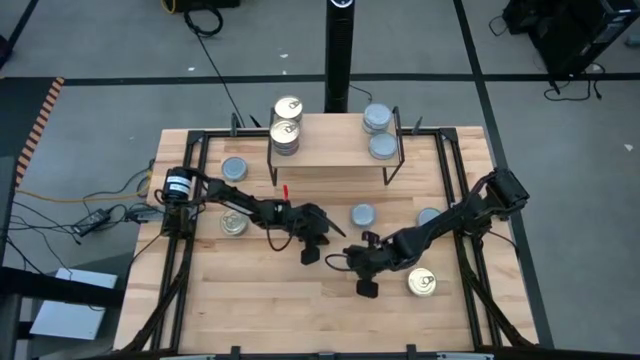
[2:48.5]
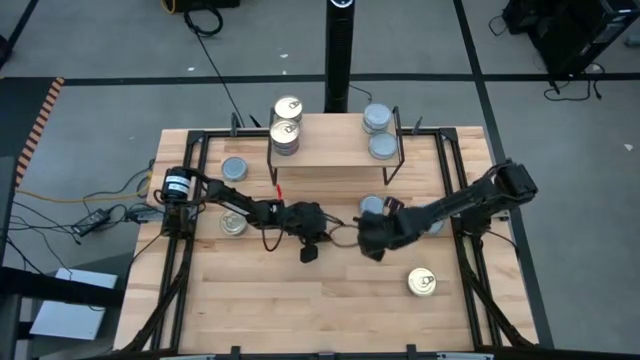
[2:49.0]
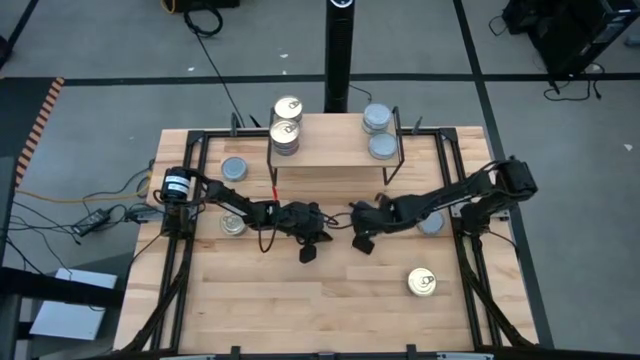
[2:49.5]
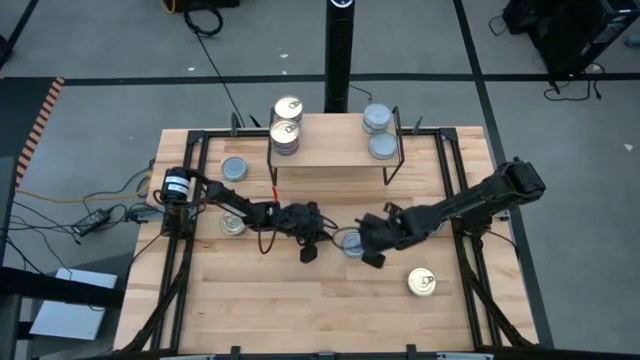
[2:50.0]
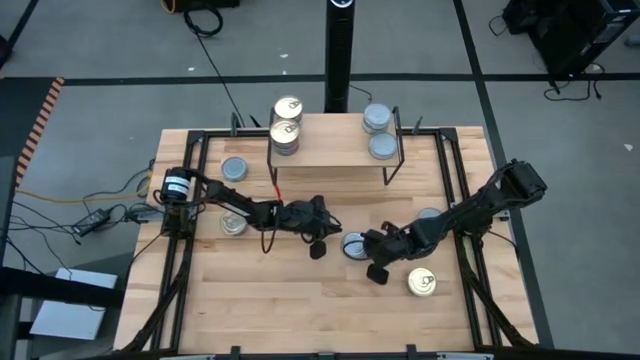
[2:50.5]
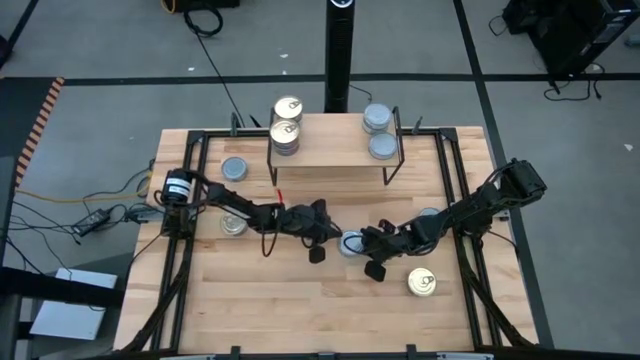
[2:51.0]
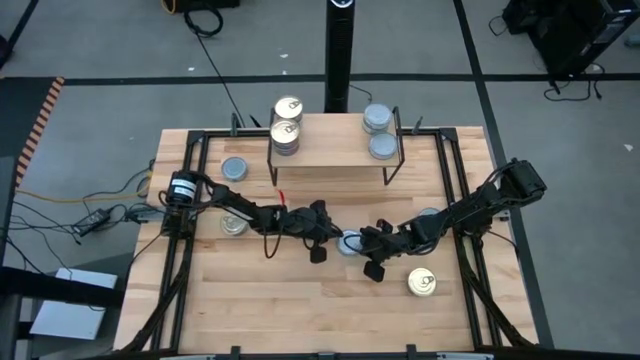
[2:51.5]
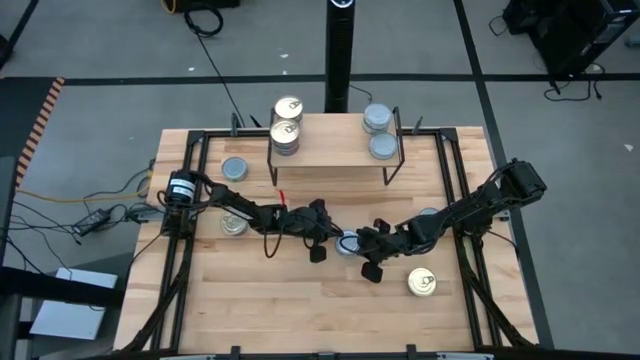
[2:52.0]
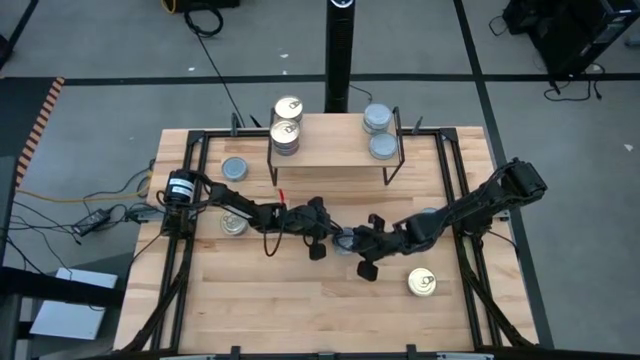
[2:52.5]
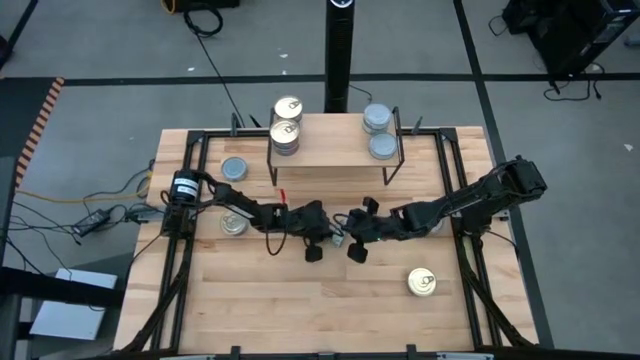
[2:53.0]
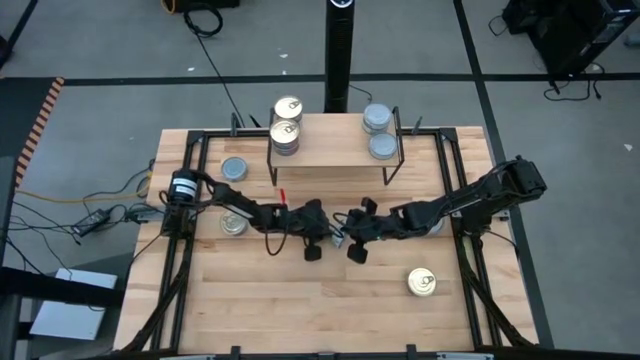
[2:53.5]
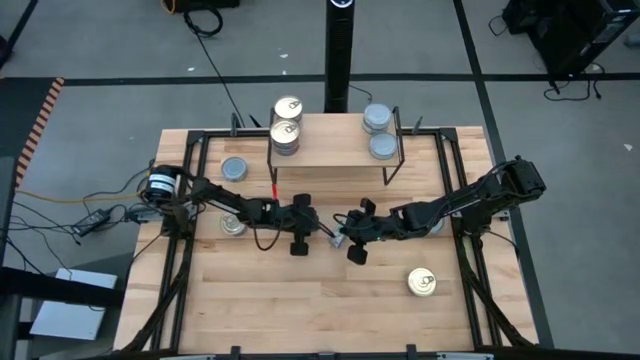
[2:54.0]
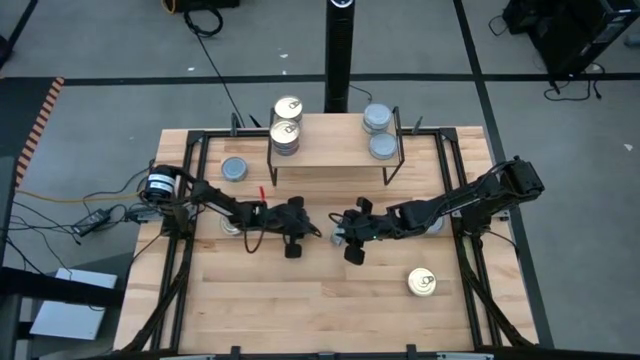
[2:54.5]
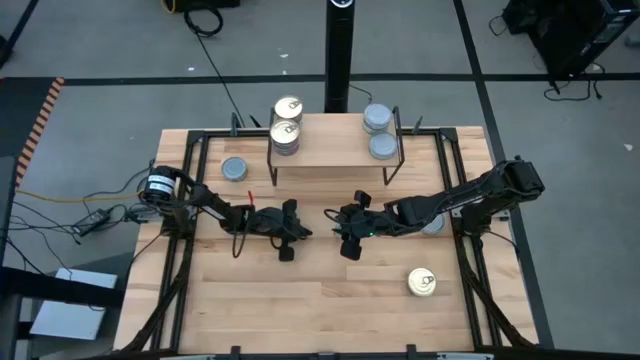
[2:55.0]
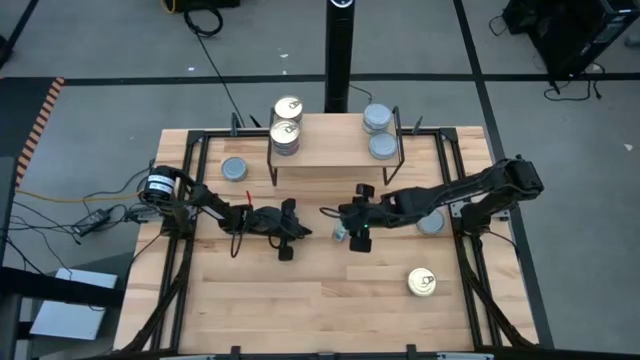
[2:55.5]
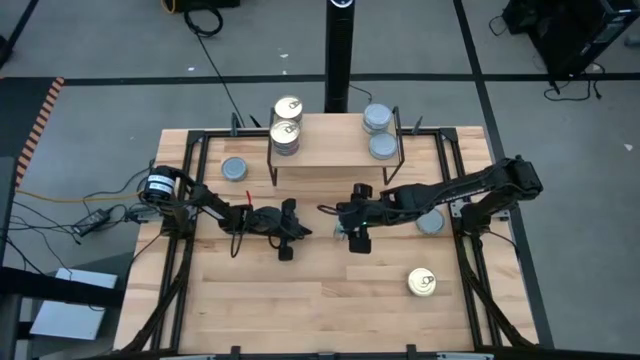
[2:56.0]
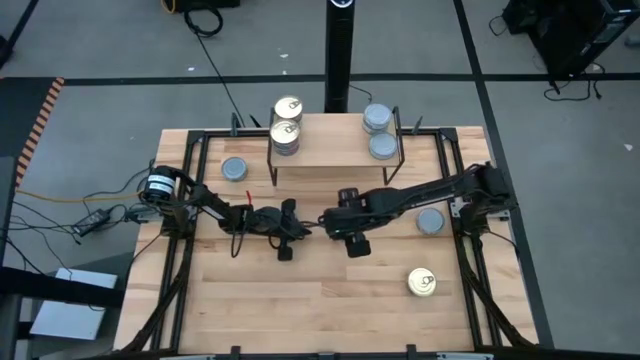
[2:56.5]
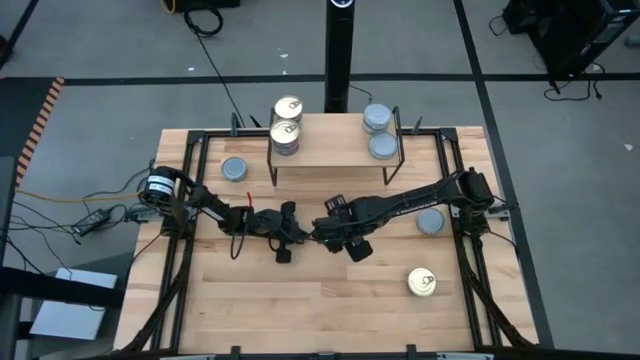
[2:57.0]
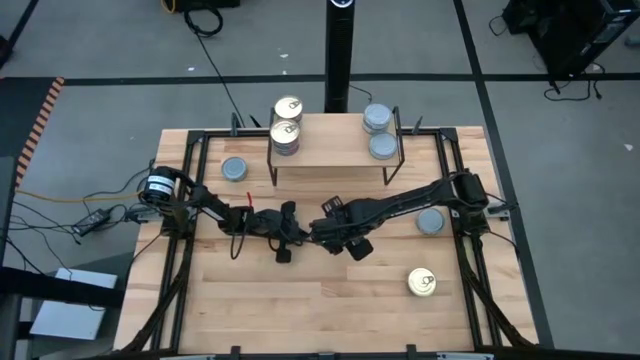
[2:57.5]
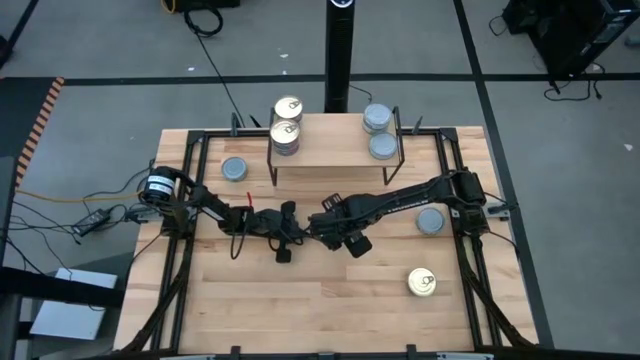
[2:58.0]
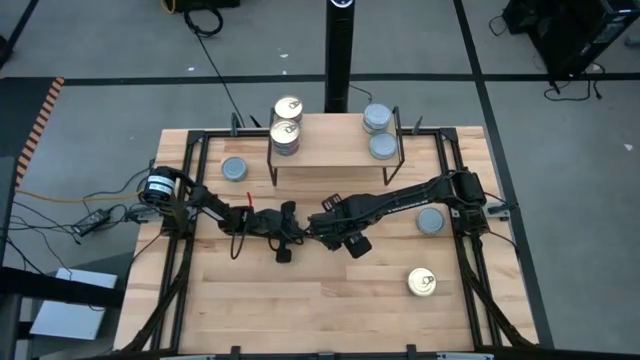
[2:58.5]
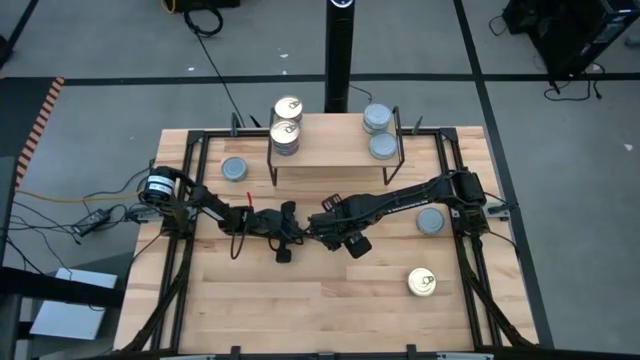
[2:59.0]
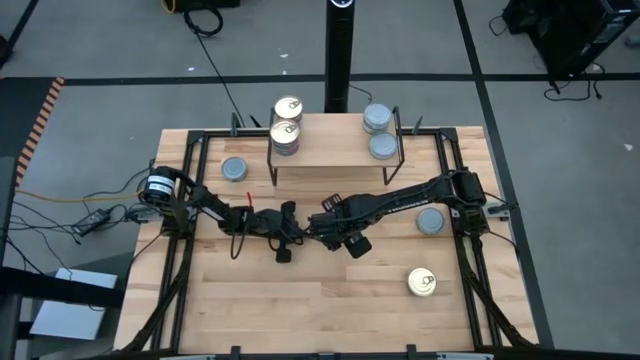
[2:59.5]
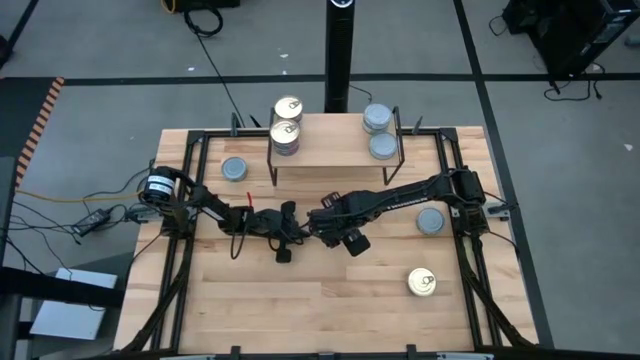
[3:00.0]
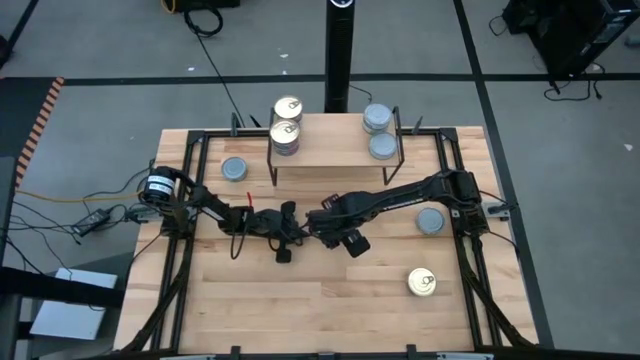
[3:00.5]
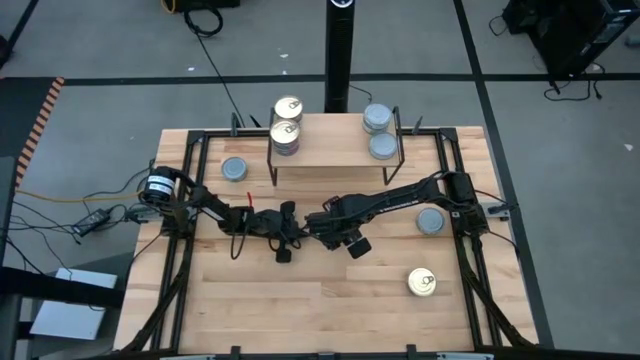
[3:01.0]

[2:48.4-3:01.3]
Task: Stack canned seafood by type on shelf
Stack the green tuna can on the bottom green tuna can on the shelf

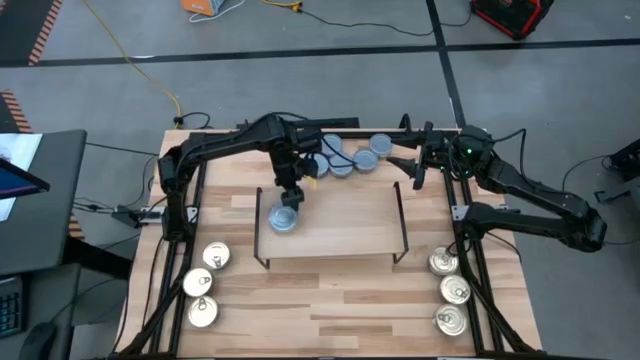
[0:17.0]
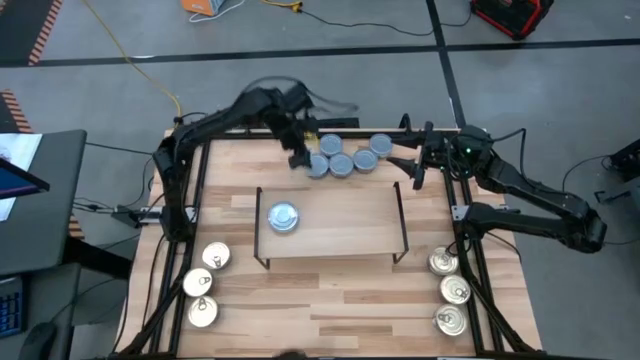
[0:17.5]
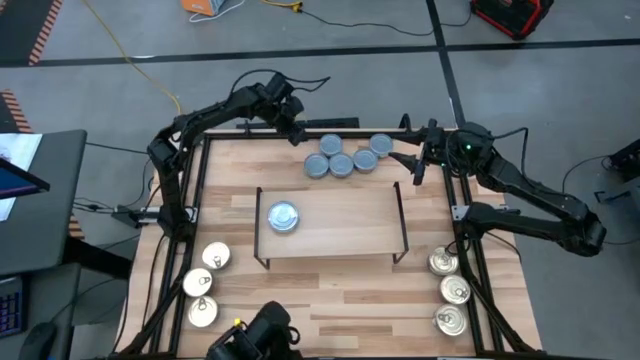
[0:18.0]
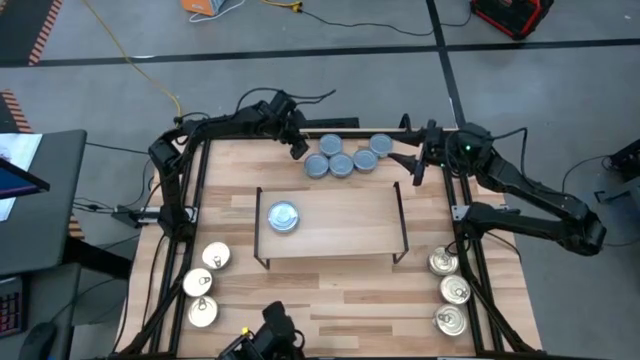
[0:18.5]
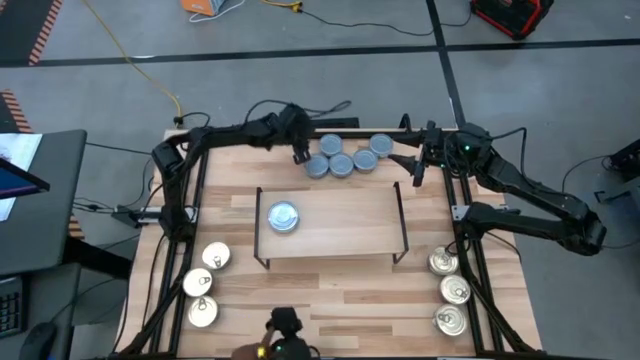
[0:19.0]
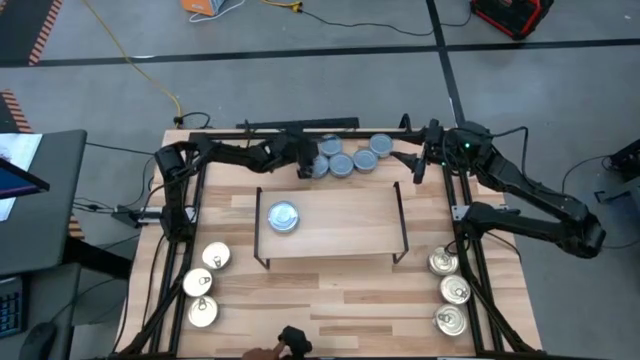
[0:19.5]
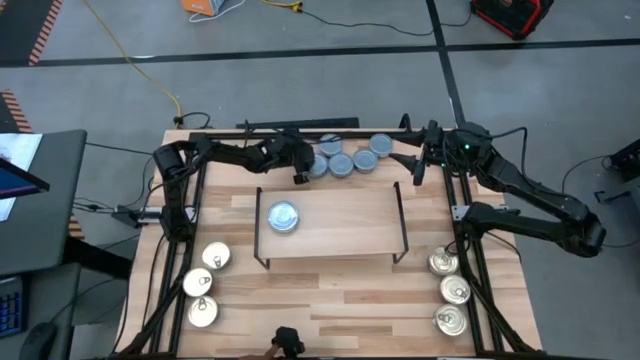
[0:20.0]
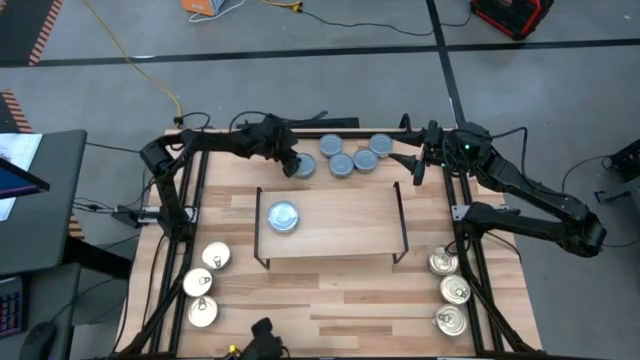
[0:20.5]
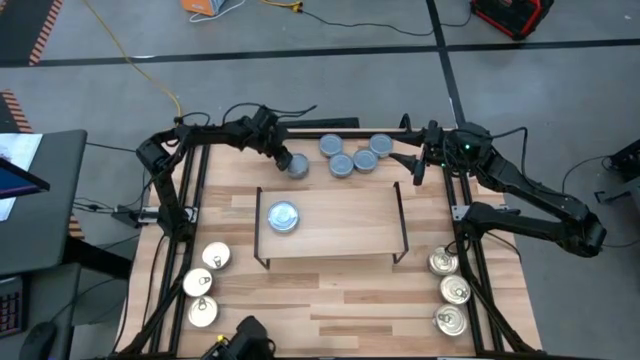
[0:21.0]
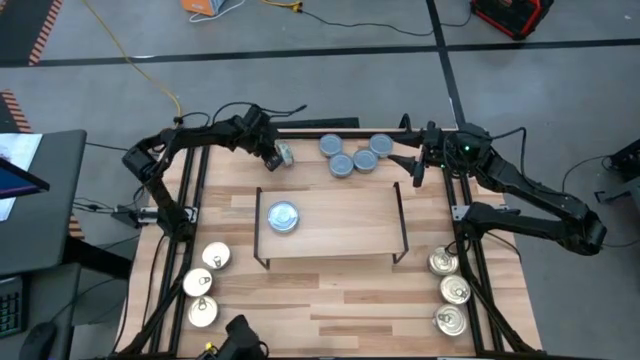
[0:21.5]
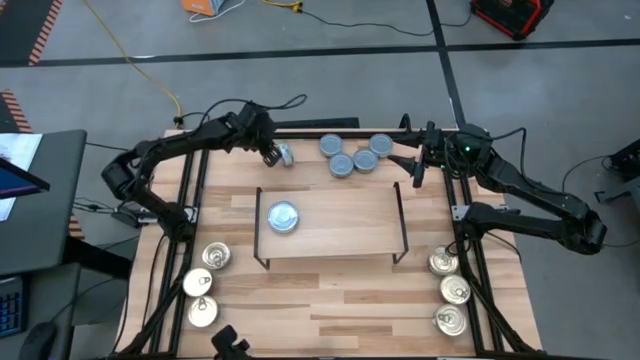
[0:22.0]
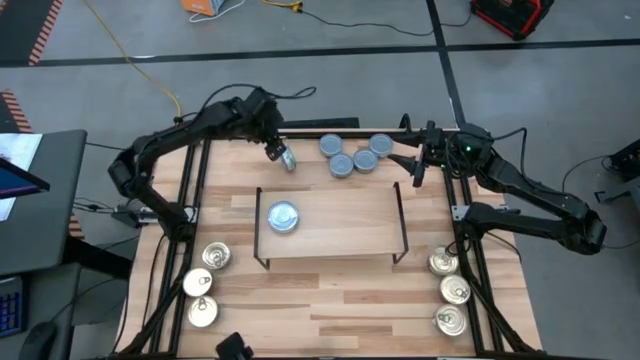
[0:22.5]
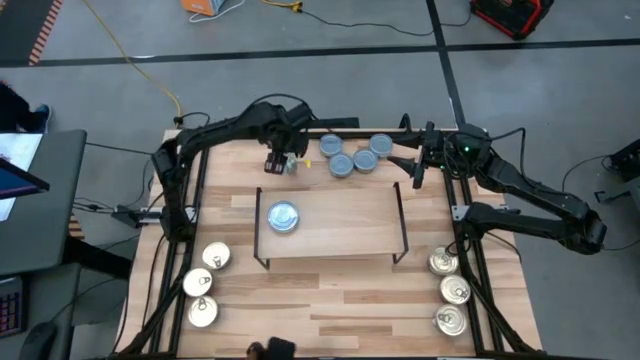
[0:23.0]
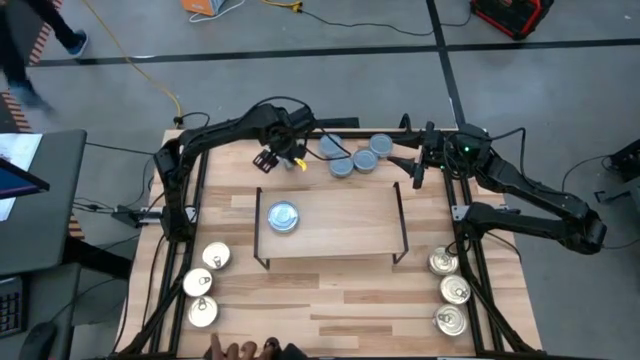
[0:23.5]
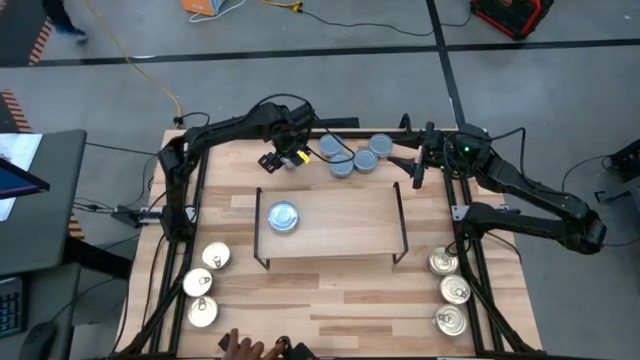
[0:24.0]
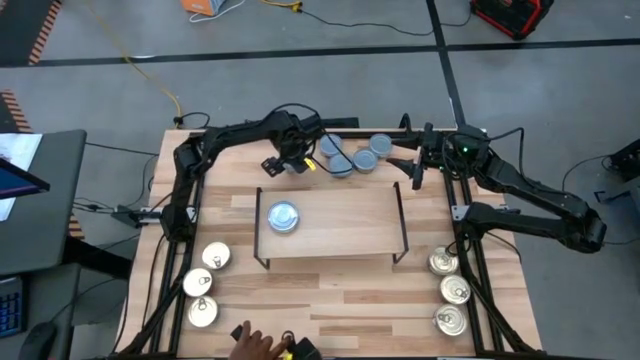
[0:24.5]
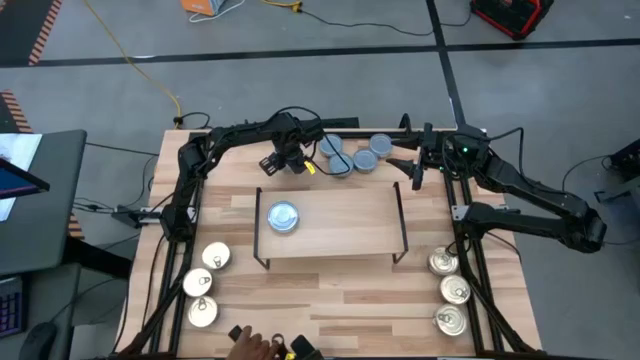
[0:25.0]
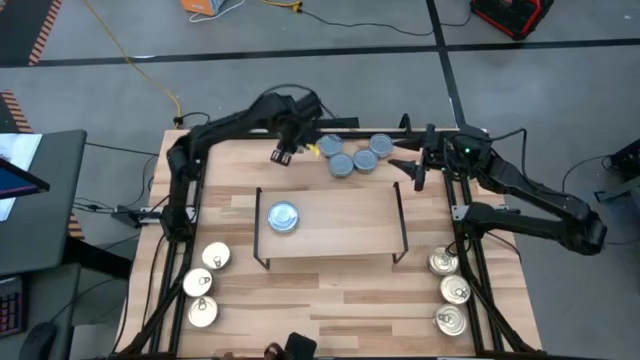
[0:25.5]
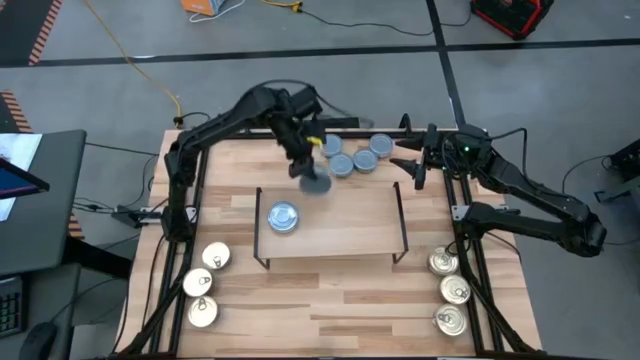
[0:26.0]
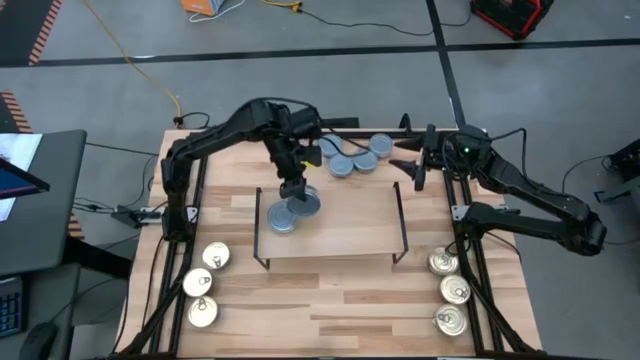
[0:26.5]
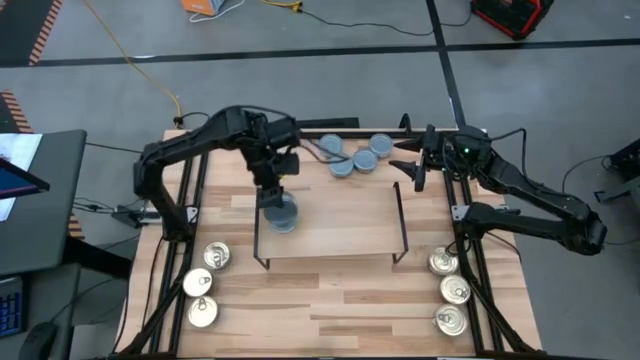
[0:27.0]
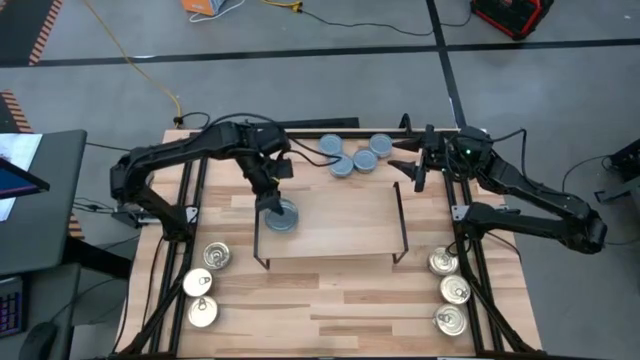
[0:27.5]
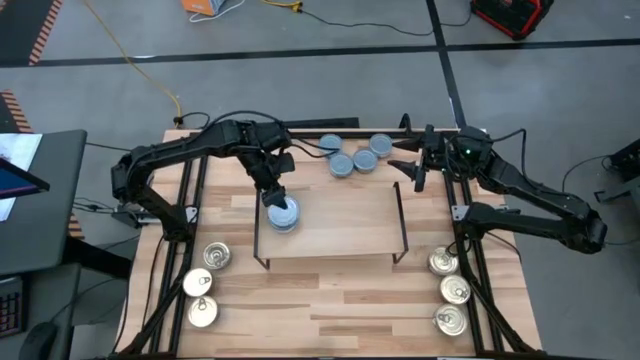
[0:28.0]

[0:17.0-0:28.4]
Task: Stack canned seafood by type on shelf
Stack the green tuna can on top of the green tuna can on the shelf
